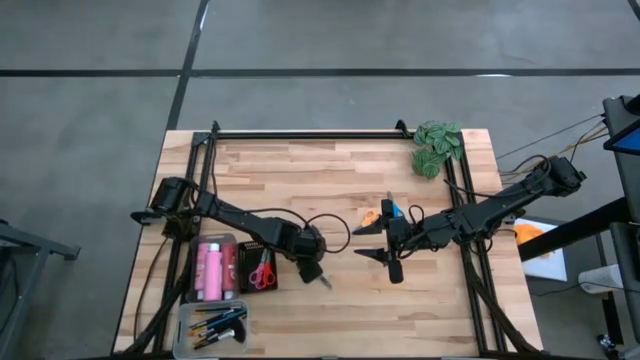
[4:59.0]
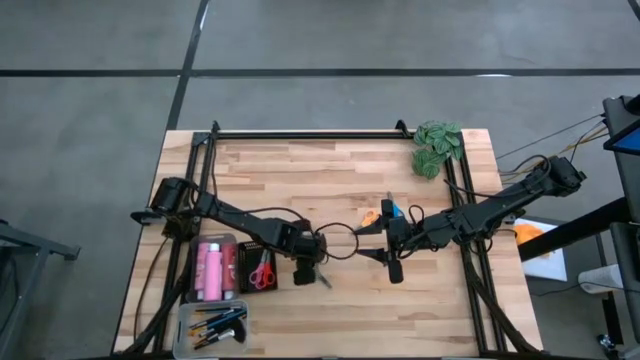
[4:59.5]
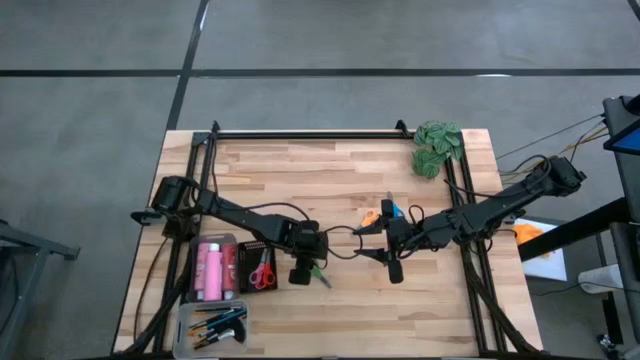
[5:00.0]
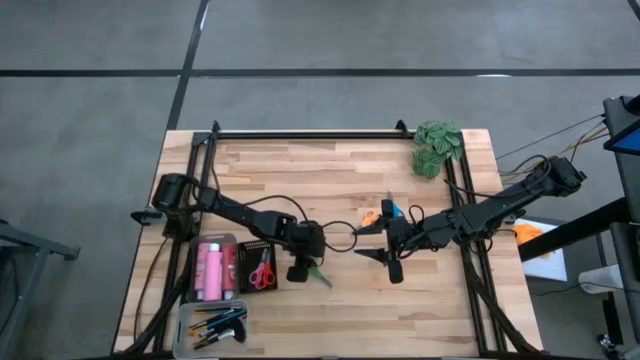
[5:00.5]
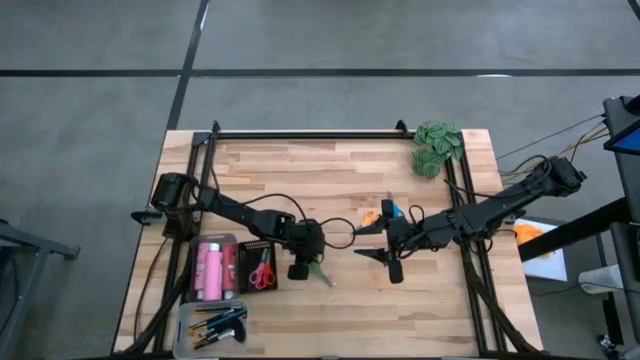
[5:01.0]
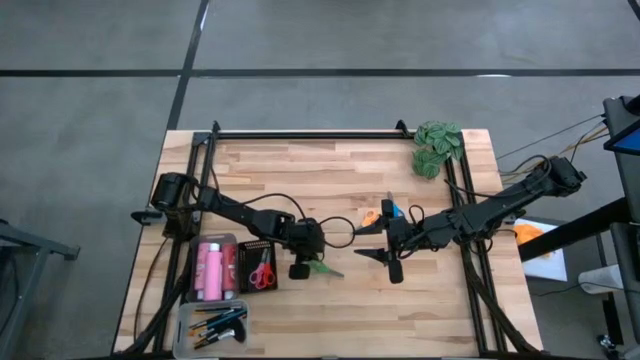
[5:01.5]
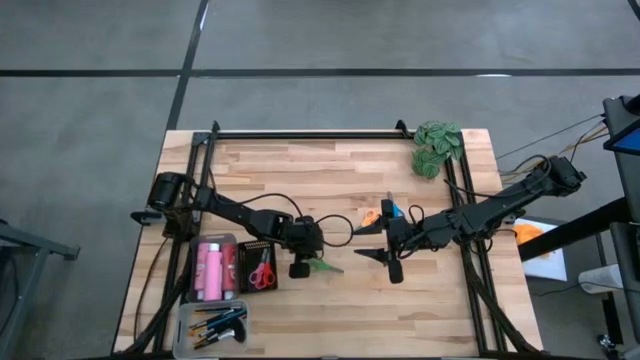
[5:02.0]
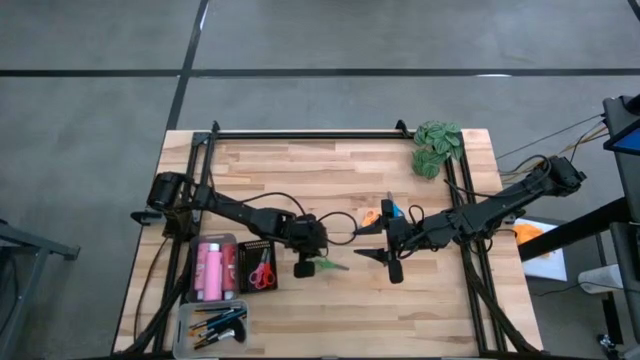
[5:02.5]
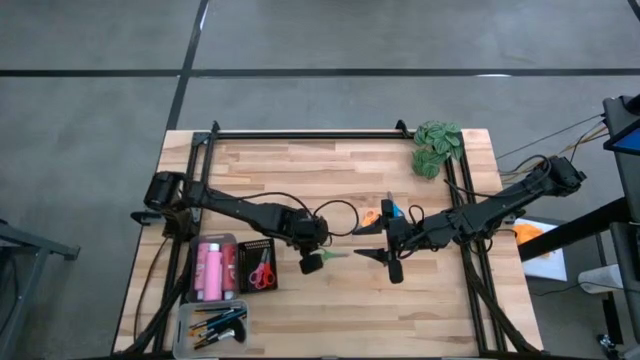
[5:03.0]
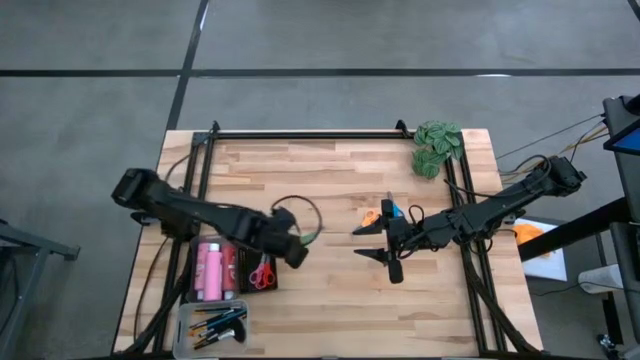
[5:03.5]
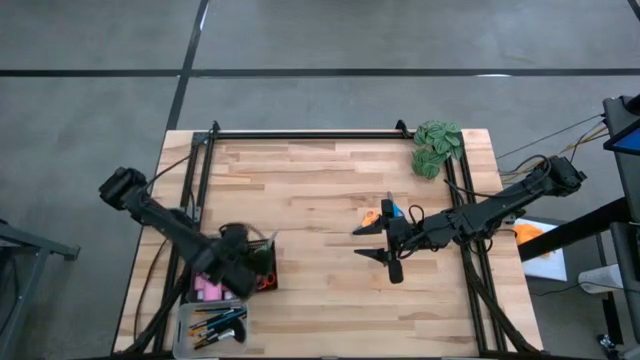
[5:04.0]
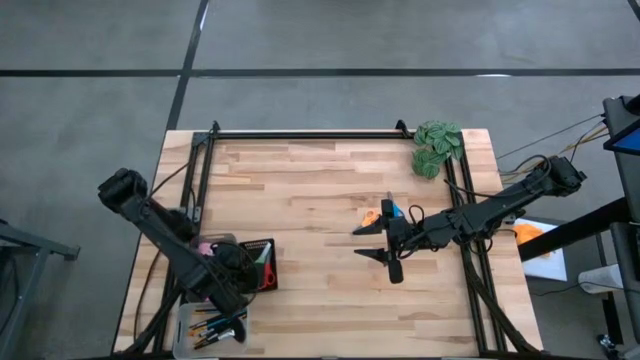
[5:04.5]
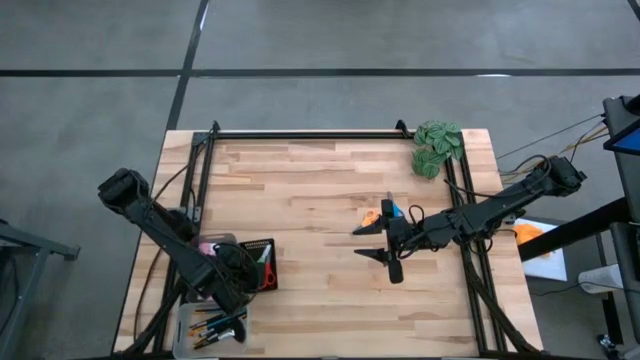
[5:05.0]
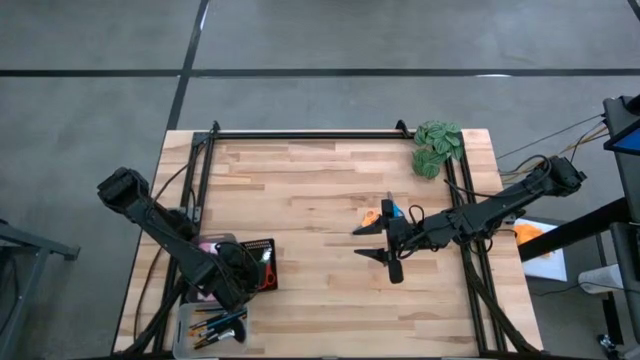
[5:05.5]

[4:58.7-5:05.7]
Task: Pick & Place Paint Supplies
Put the green scissors into the black bin

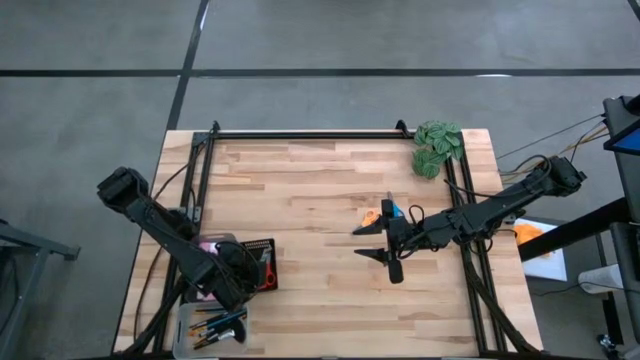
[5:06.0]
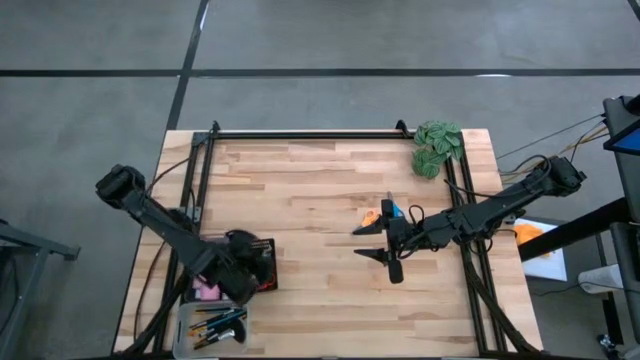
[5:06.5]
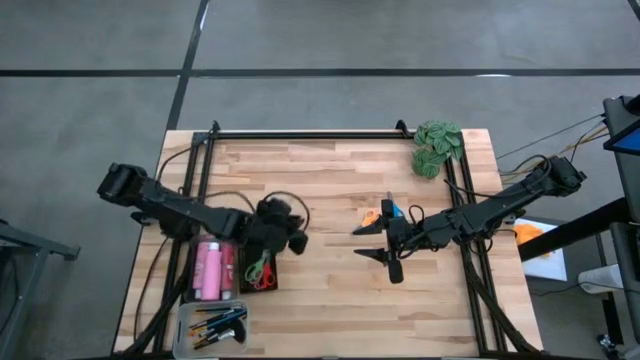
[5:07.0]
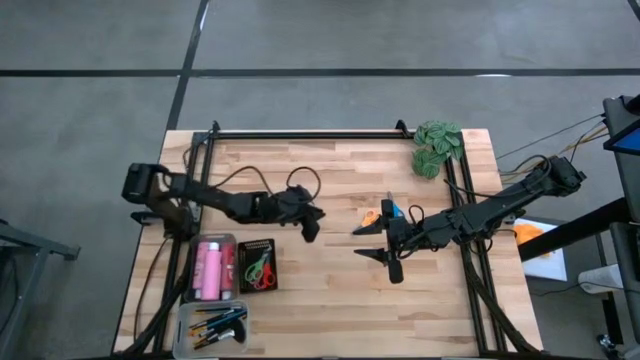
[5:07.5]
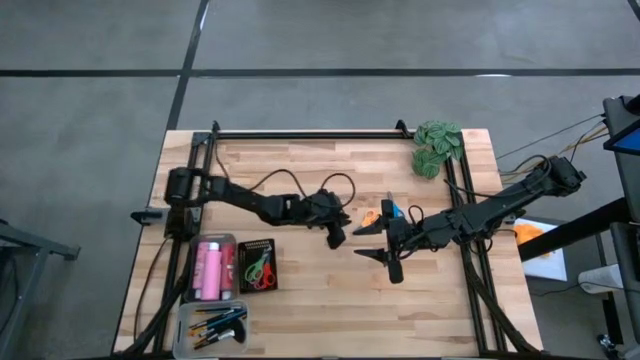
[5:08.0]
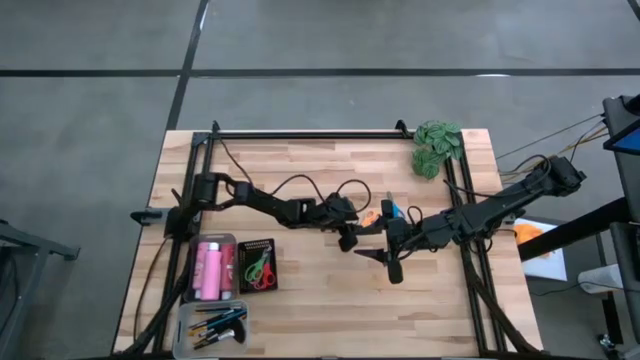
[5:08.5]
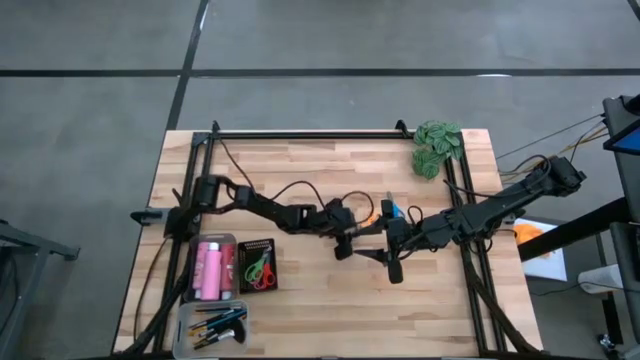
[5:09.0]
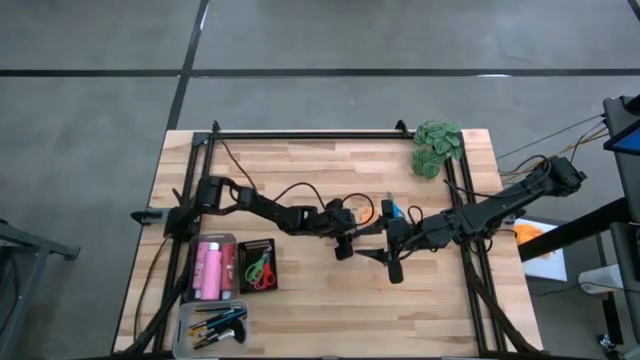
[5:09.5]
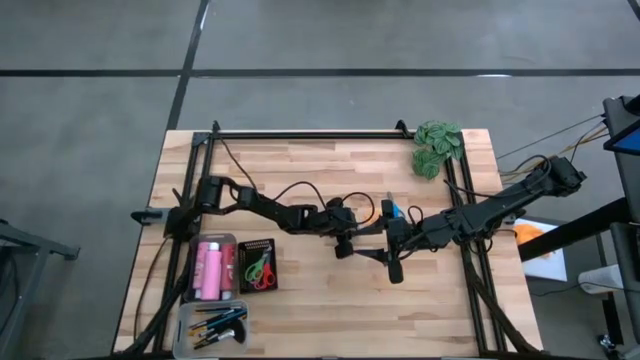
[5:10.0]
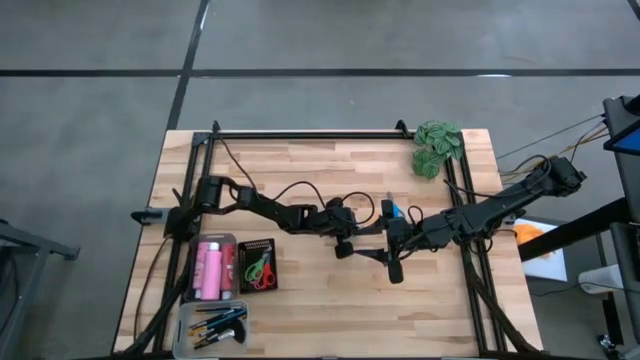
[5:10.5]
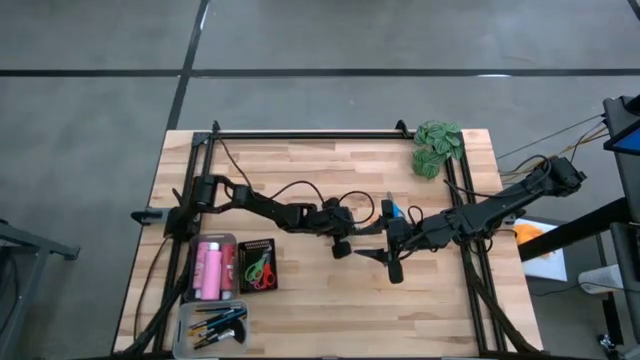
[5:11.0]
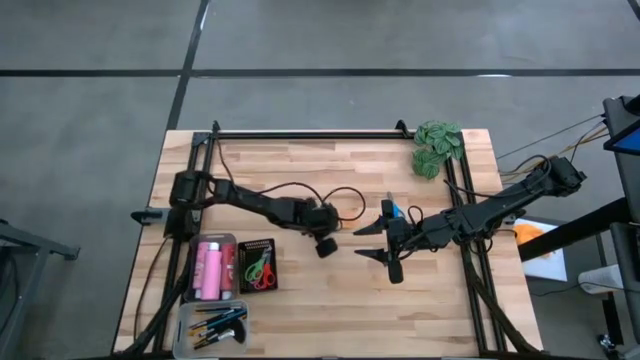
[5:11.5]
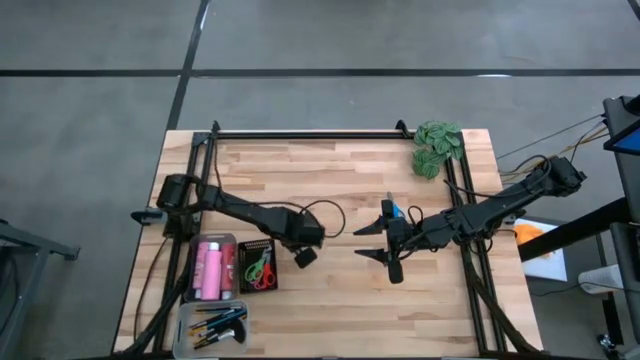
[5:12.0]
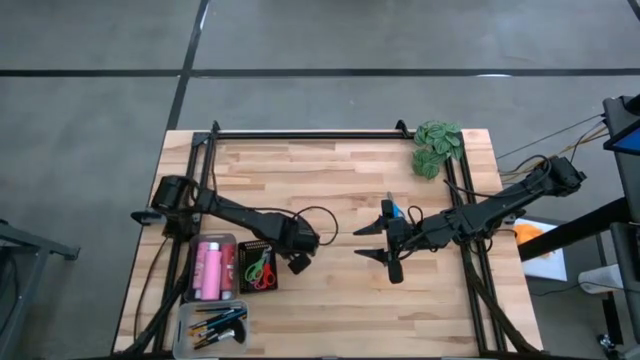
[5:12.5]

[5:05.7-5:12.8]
Put the yellow scissors into the black bin

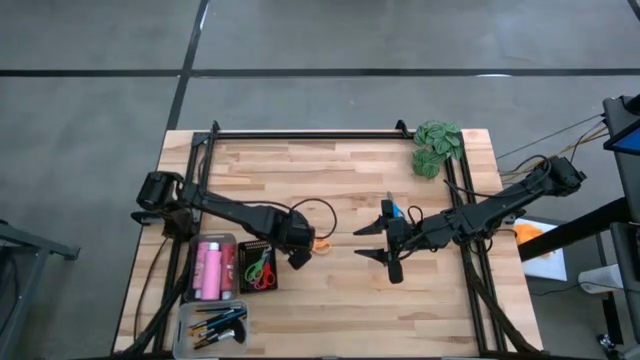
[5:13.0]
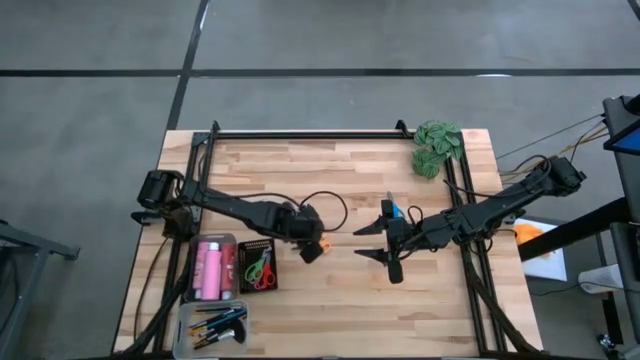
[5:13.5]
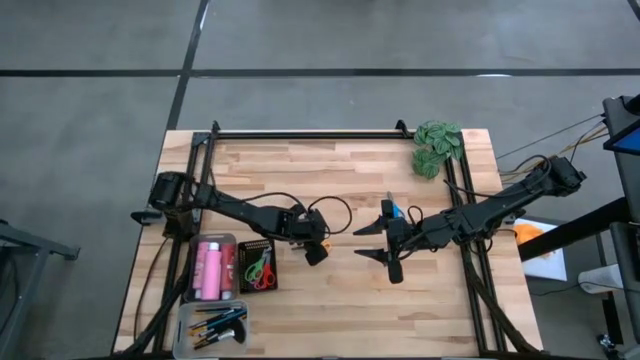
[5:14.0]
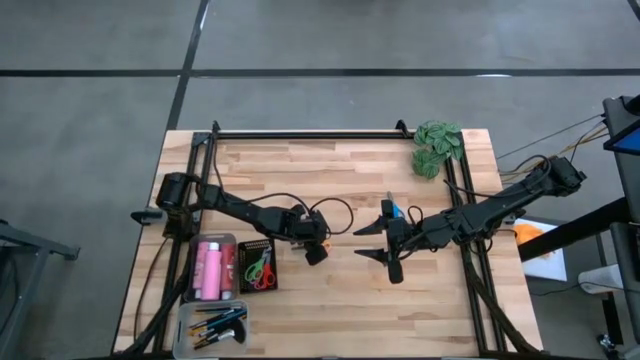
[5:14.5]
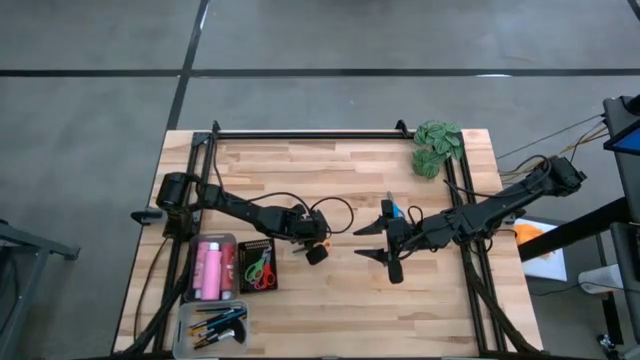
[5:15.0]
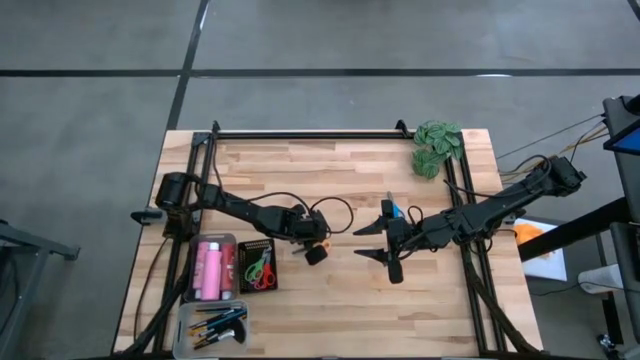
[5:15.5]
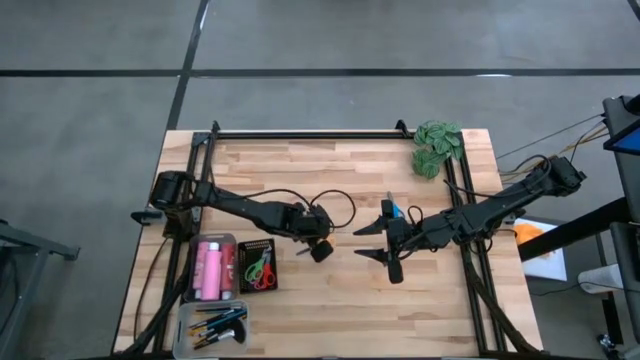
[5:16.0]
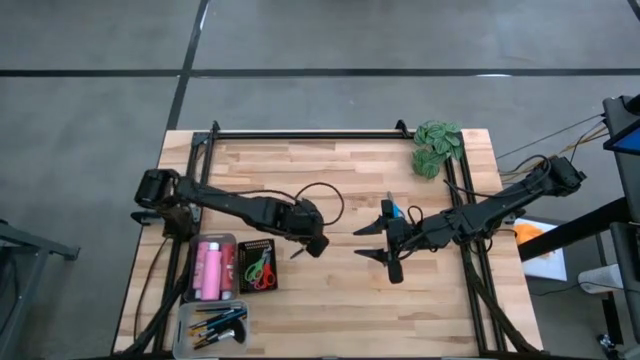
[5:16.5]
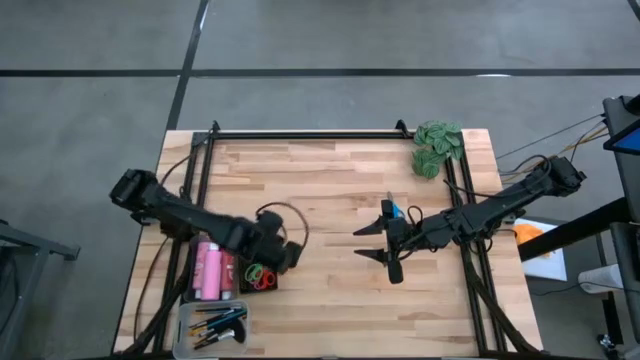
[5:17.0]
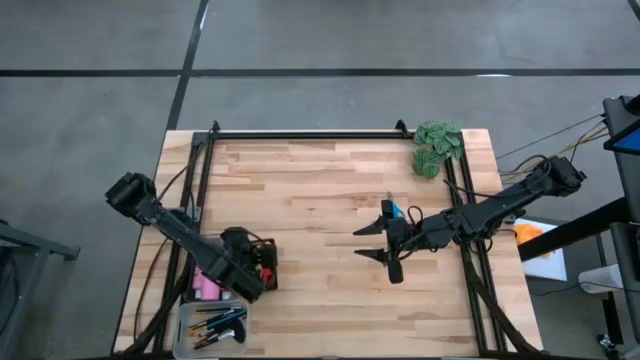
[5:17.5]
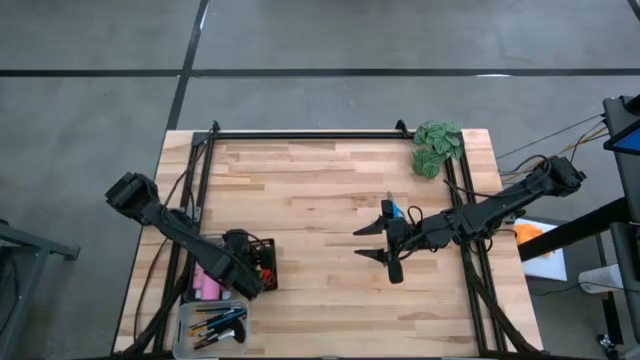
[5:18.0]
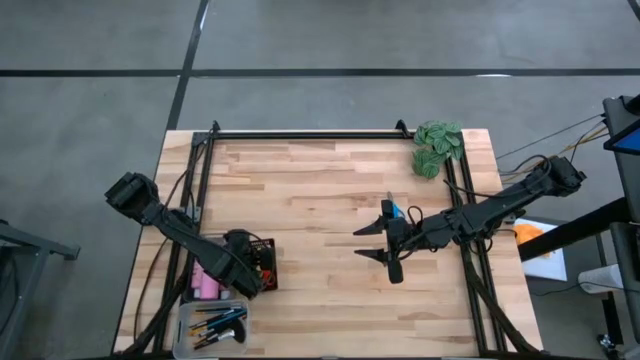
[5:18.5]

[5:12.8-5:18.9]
Put the yellow scissors into the black bin

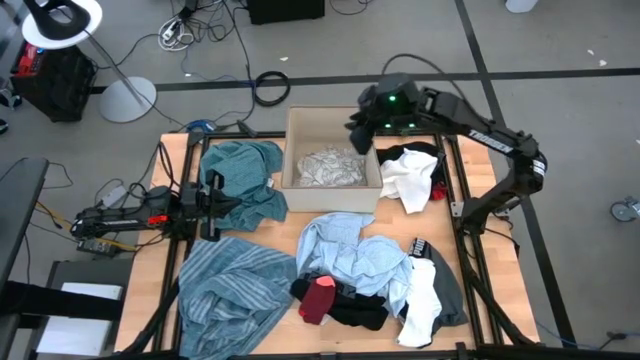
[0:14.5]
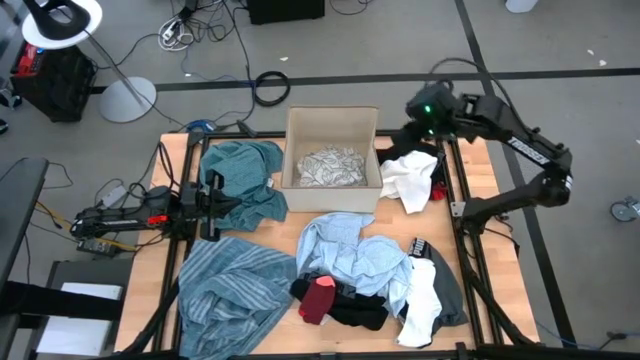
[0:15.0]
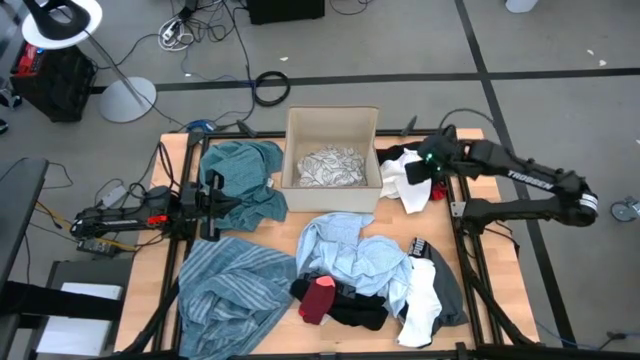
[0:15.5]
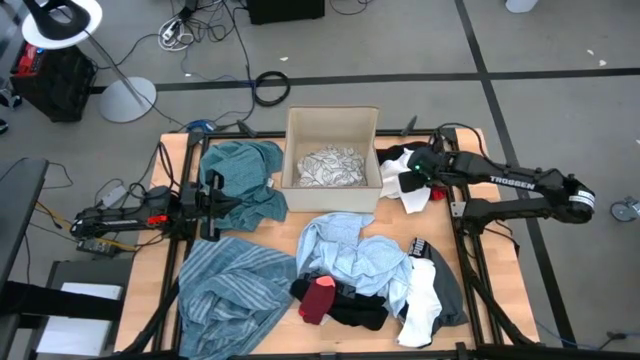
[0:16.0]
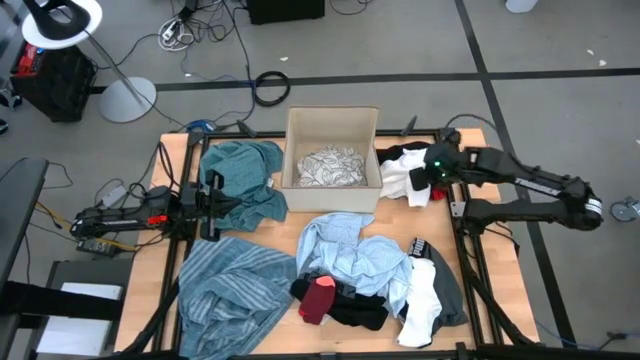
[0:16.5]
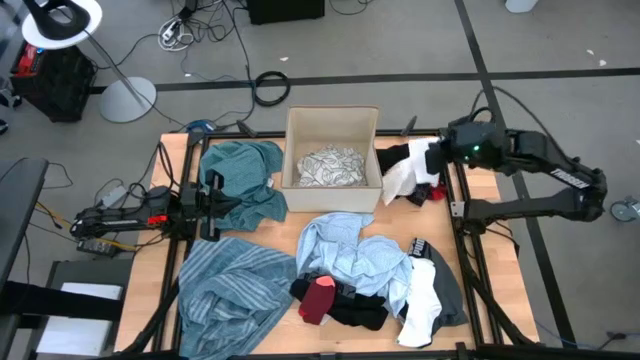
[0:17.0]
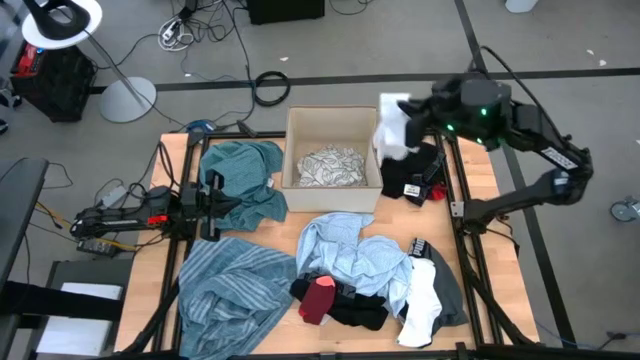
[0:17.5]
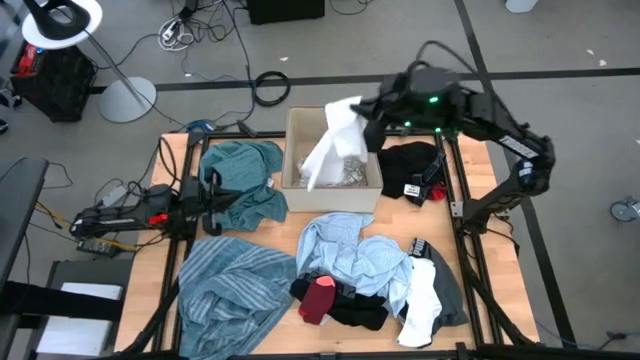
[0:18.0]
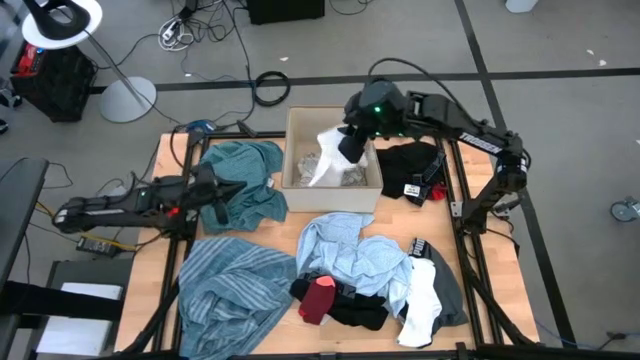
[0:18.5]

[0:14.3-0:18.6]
Task: Sort clothes
Put the white pants into the white laundry bin
